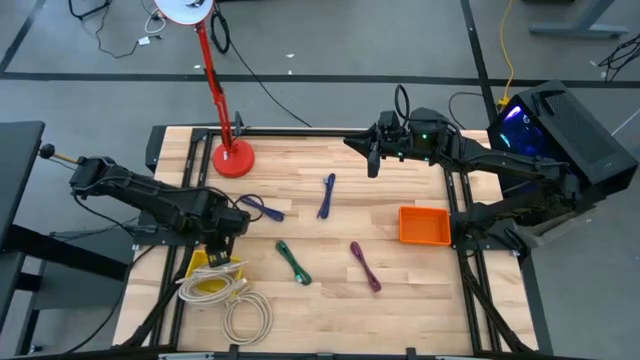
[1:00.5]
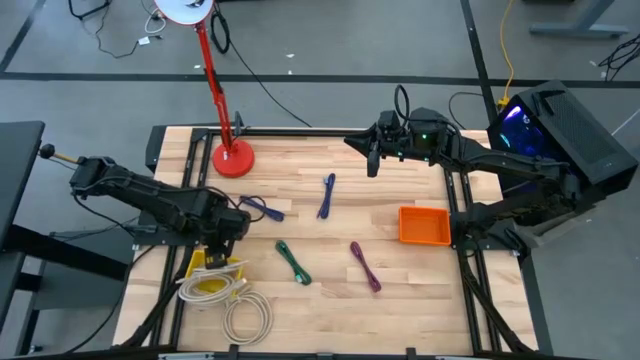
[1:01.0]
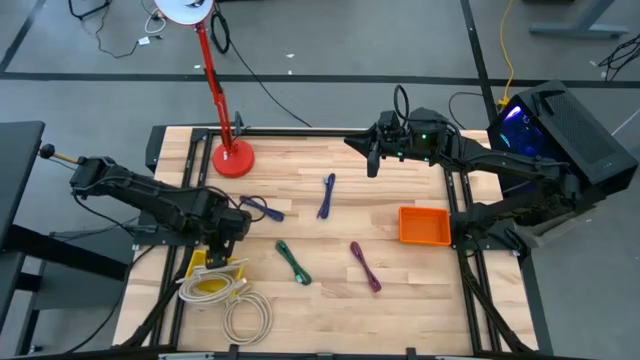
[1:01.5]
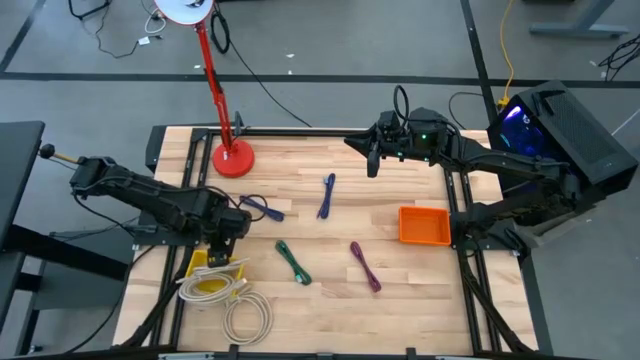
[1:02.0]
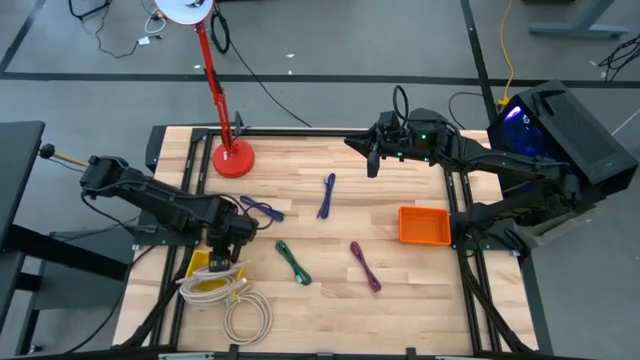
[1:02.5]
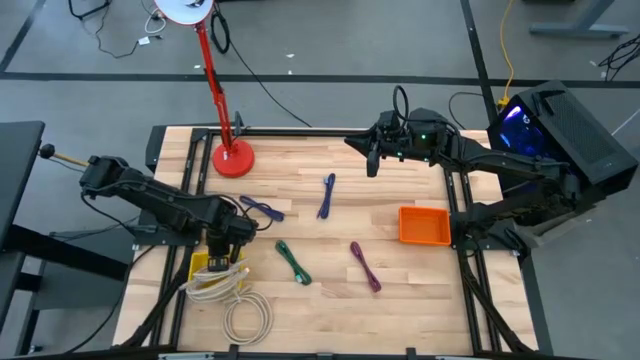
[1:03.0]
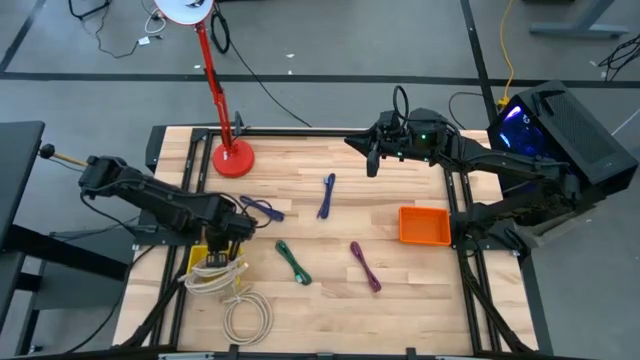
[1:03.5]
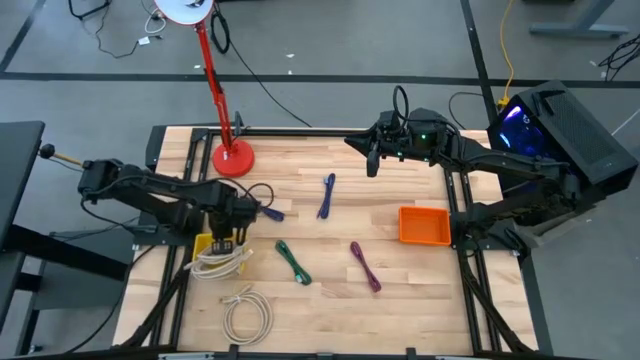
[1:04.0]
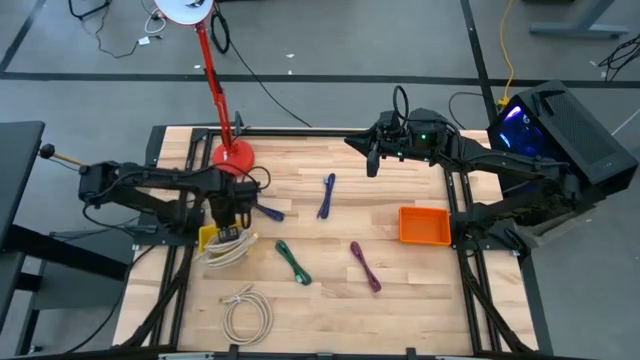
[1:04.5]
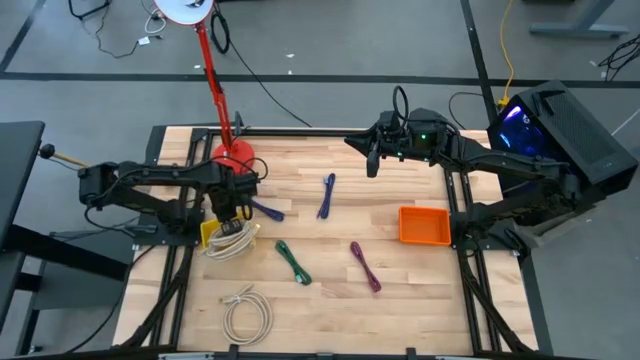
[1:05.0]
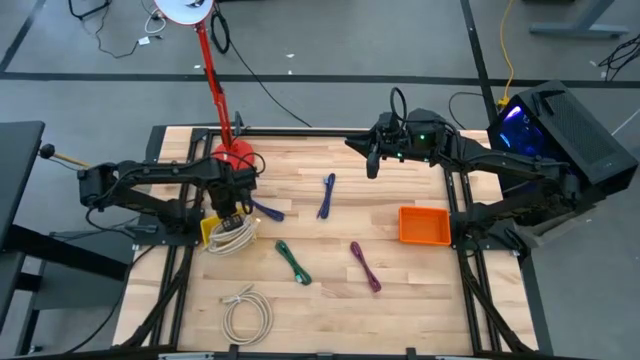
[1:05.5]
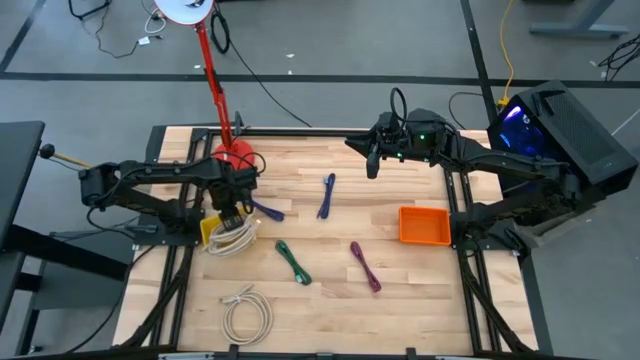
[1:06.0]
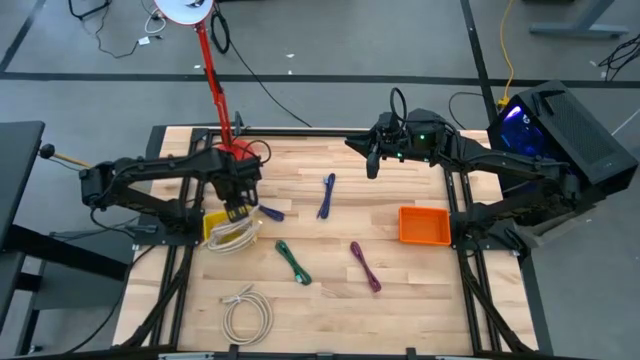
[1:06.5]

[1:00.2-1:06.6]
Task: Pick & Place USB Port
Adjust the yellow bin

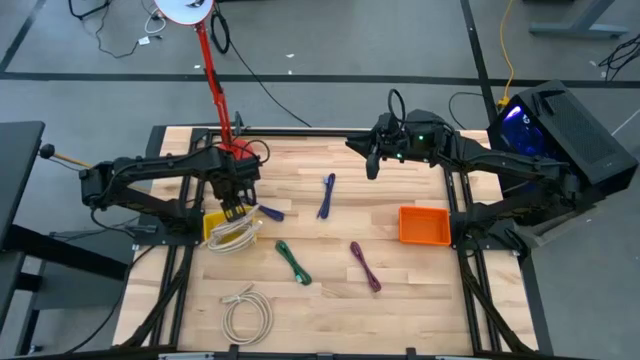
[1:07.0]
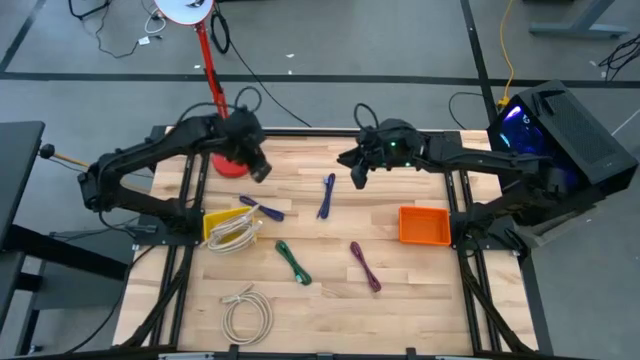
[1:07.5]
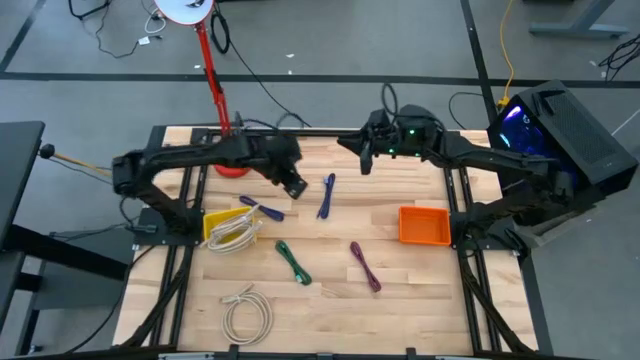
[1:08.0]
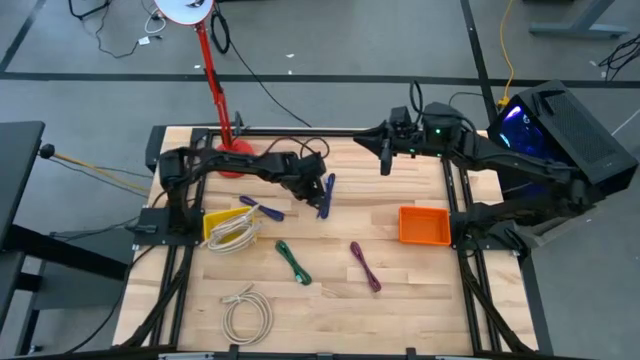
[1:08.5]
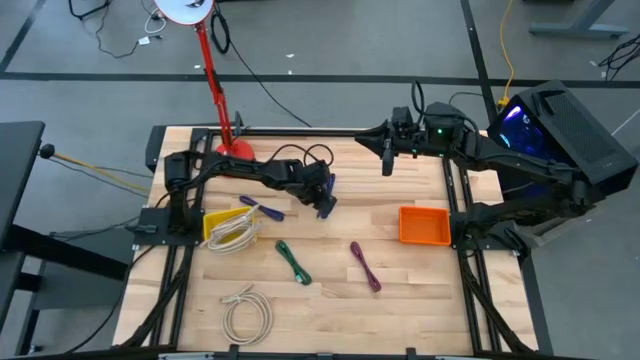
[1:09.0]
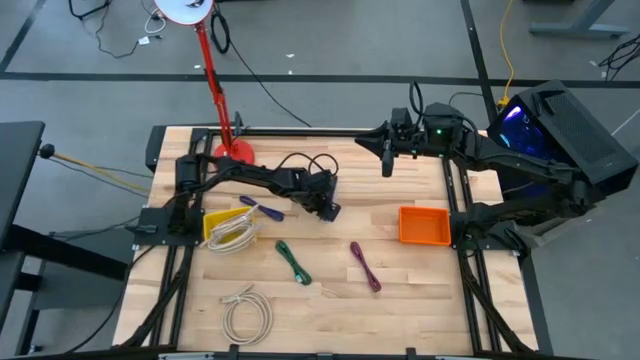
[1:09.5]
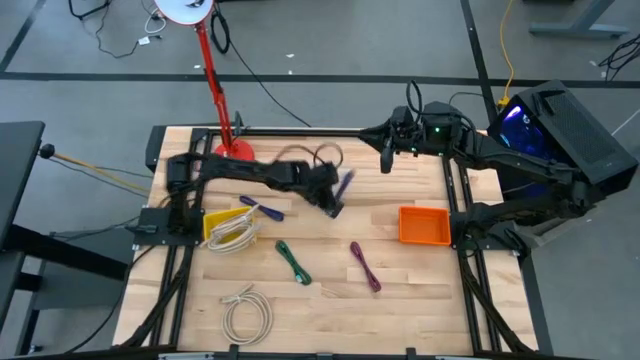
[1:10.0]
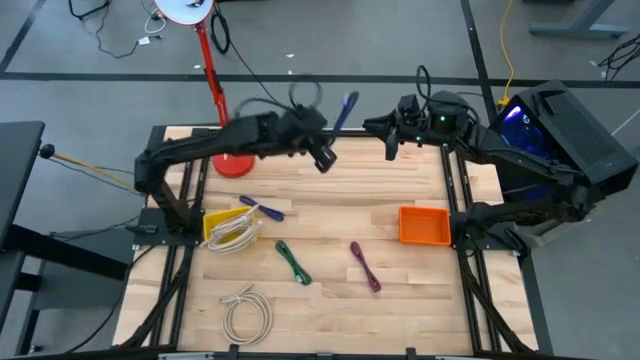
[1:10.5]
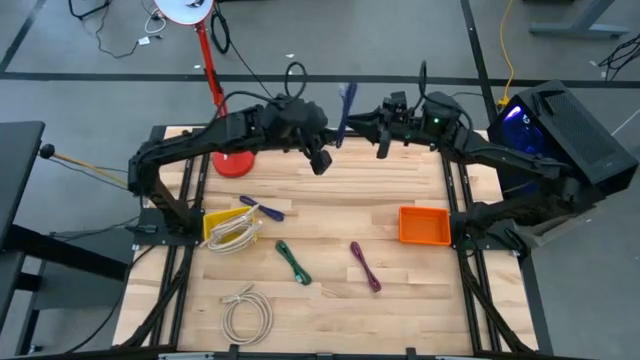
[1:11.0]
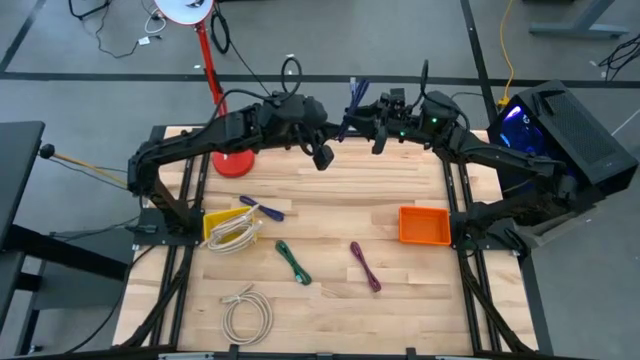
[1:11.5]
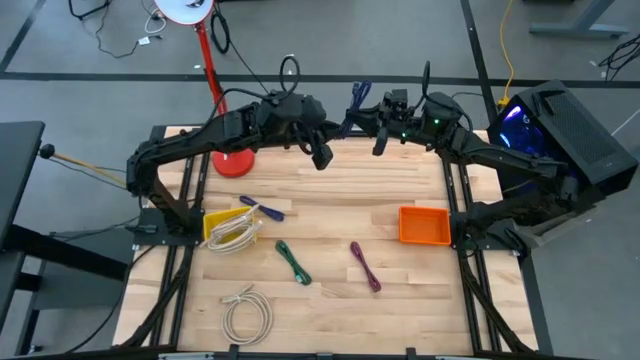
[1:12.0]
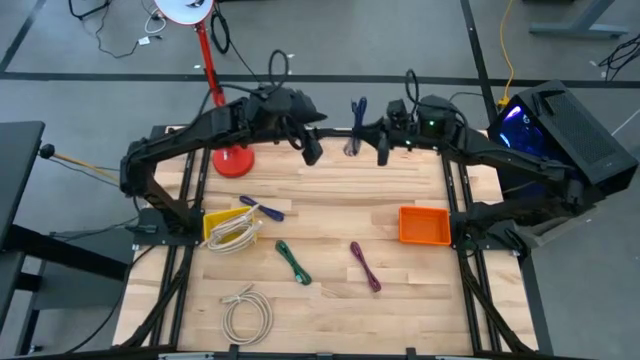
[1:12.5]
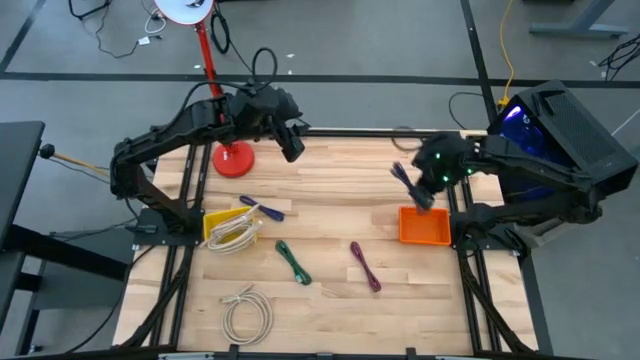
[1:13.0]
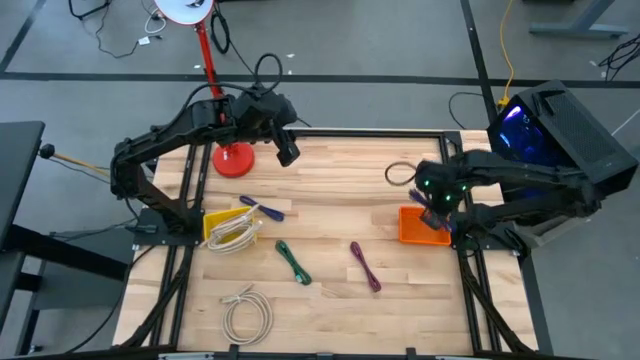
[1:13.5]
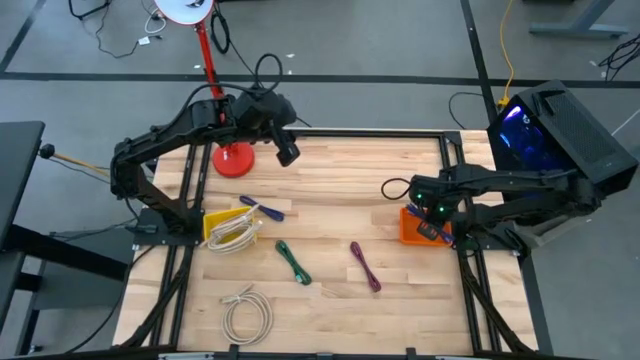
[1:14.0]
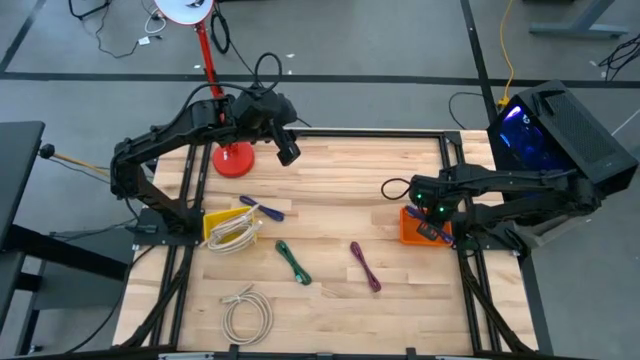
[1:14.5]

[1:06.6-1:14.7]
Put the blue USB cable into the orange bin

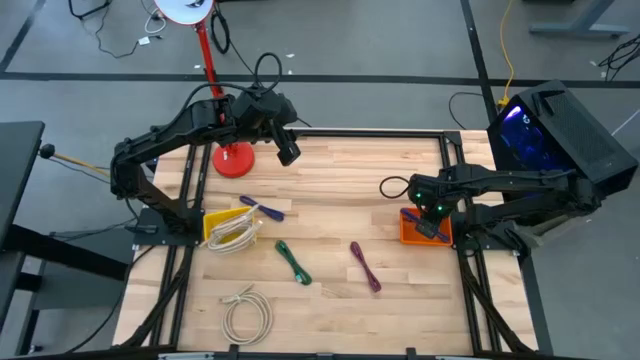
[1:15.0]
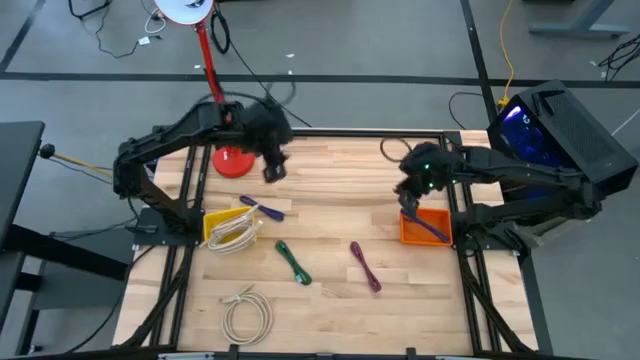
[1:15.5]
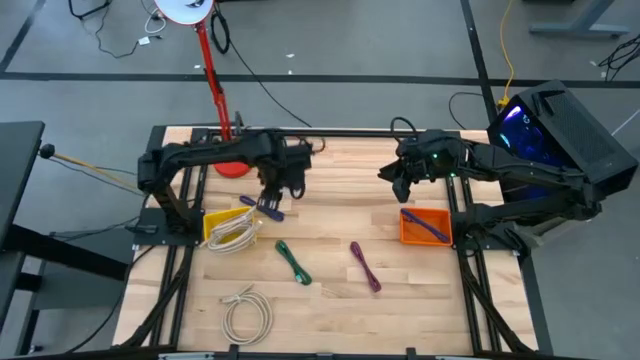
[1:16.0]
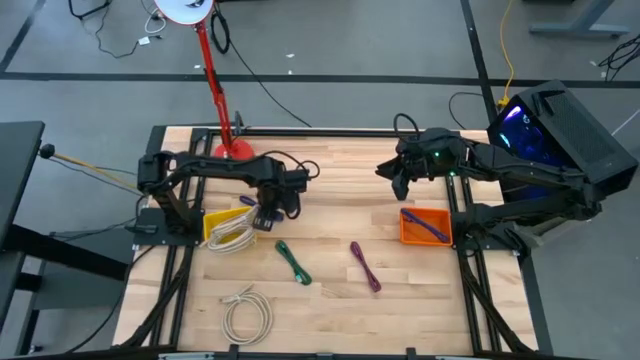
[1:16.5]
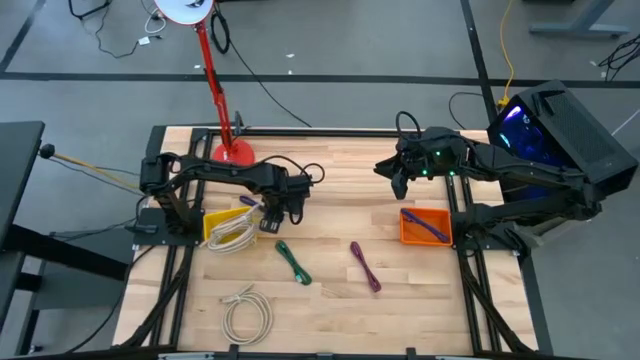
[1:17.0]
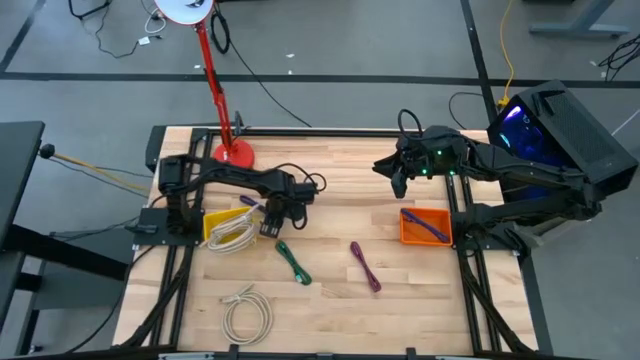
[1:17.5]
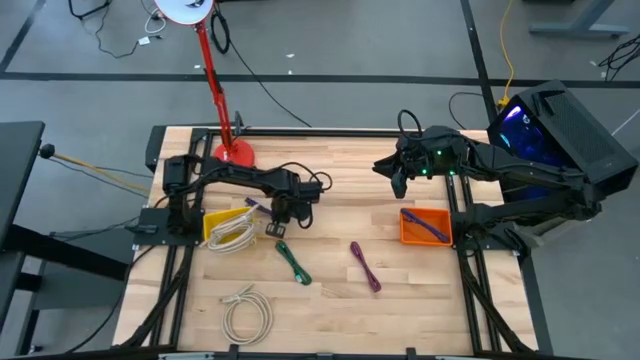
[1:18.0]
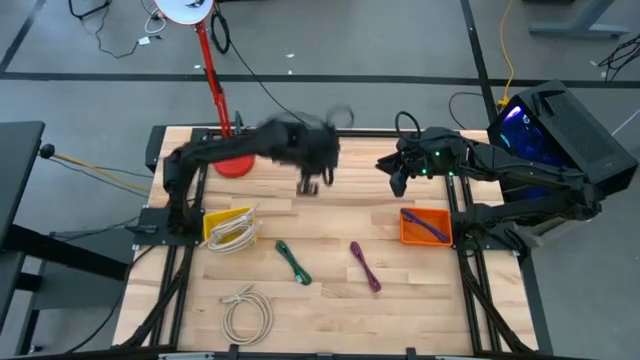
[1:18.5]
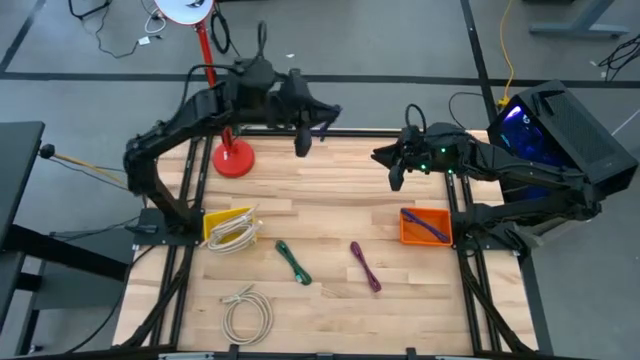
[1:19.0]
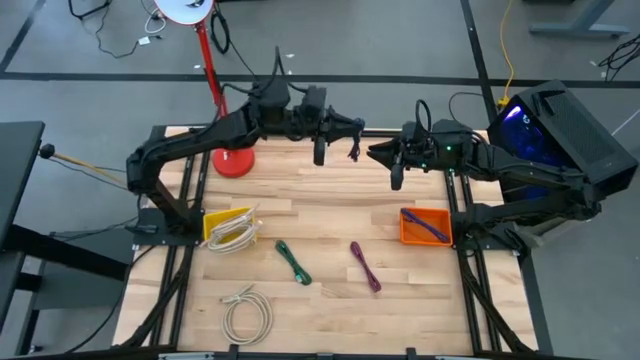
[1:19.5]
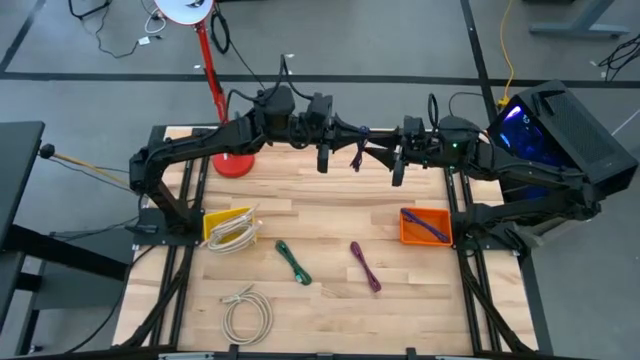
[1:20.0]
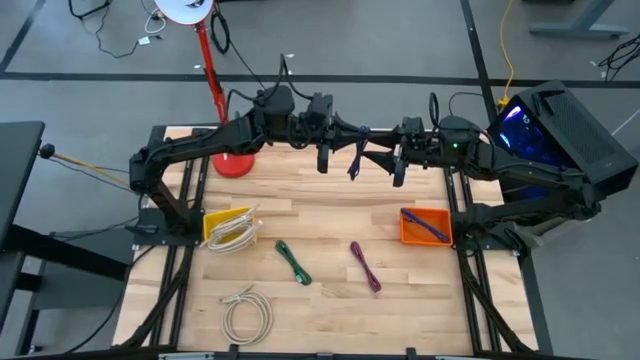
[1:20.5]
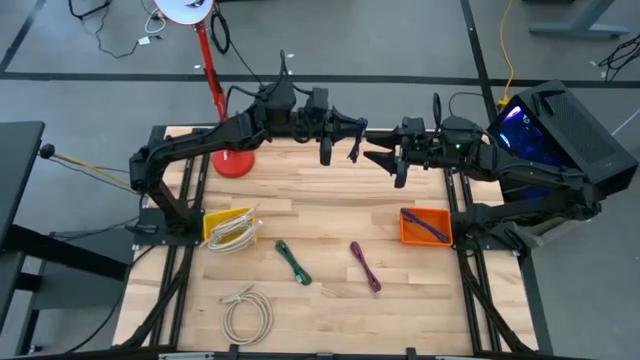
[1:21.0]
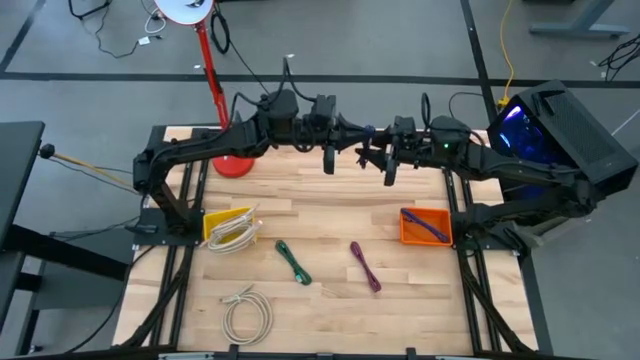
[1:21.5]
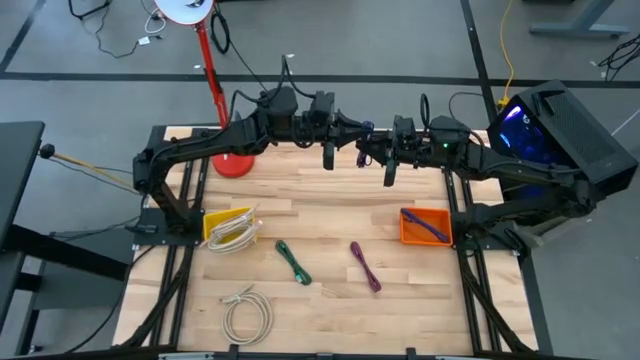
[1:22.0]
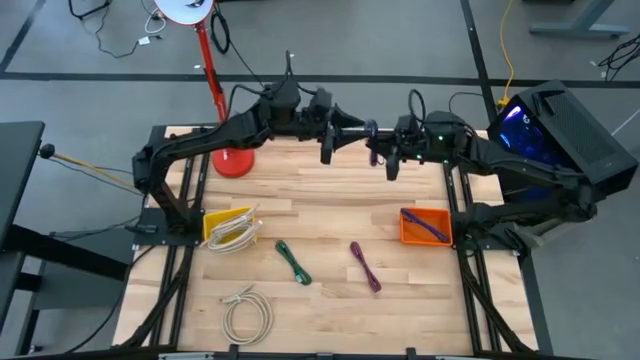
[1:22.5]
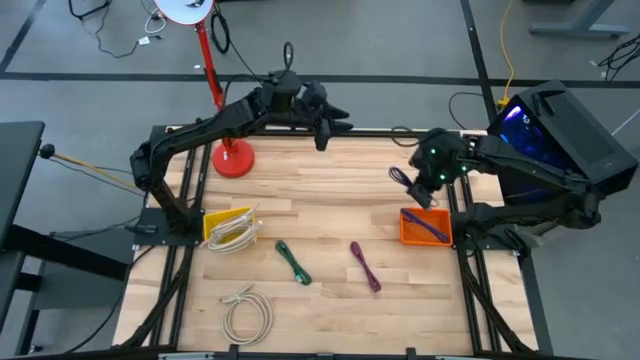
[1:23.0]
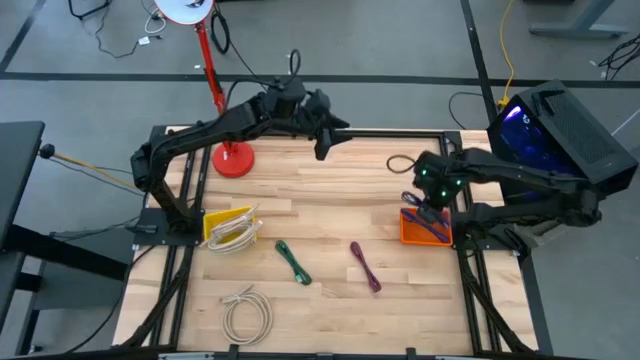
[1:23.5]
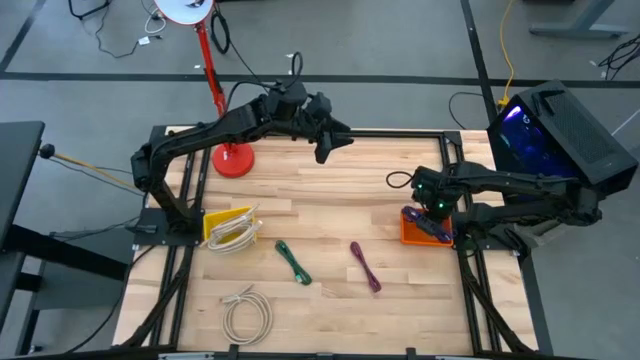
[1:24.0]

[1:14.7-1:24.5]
Put the blue USB cable into the orange bin
